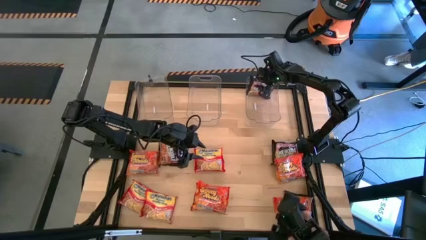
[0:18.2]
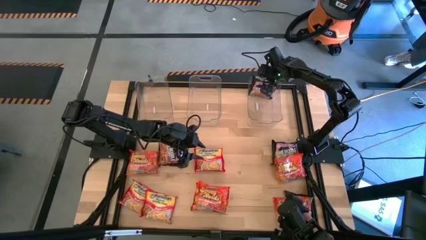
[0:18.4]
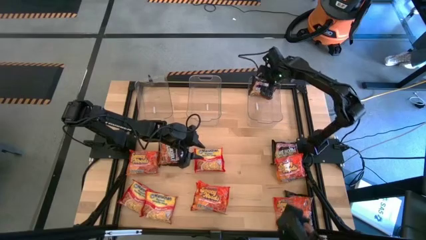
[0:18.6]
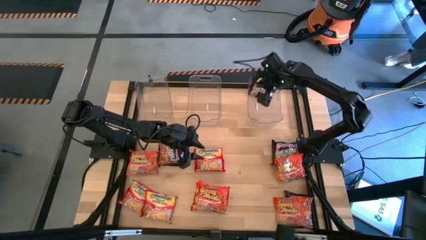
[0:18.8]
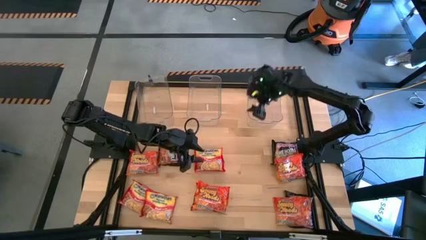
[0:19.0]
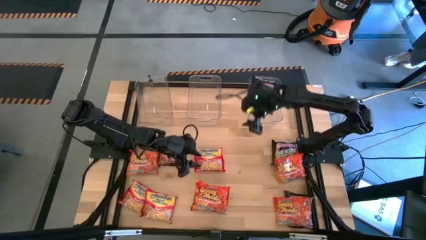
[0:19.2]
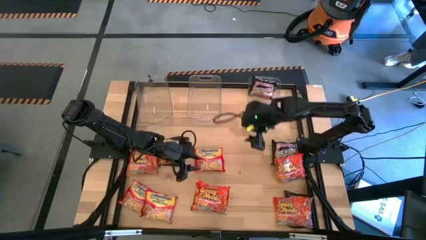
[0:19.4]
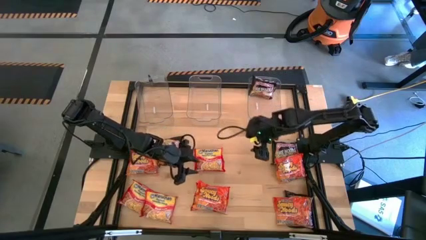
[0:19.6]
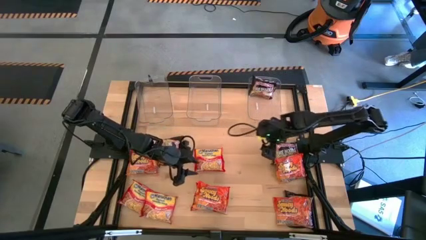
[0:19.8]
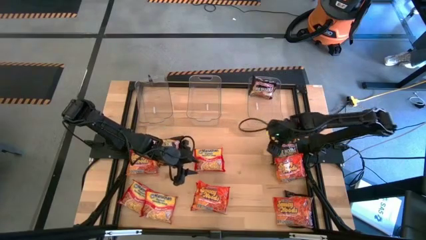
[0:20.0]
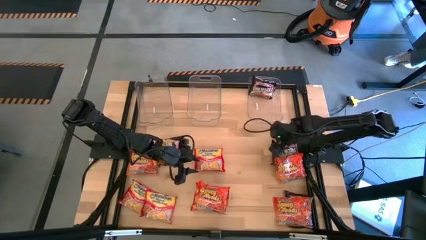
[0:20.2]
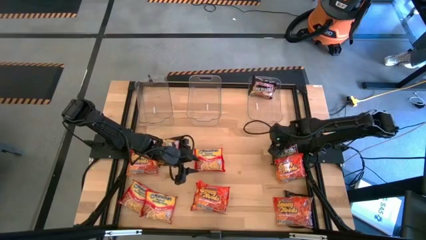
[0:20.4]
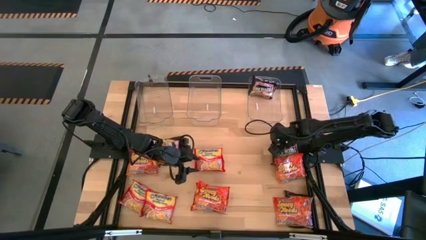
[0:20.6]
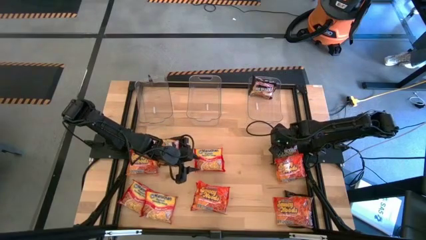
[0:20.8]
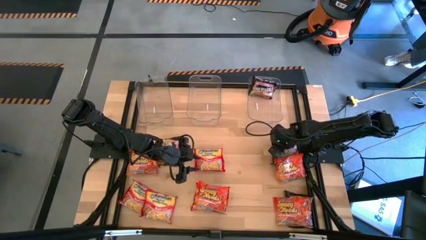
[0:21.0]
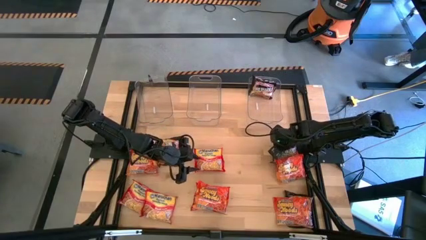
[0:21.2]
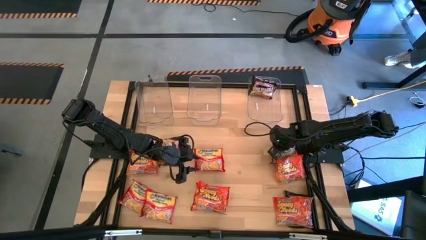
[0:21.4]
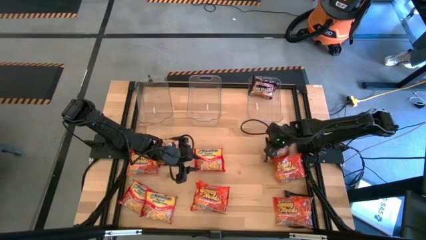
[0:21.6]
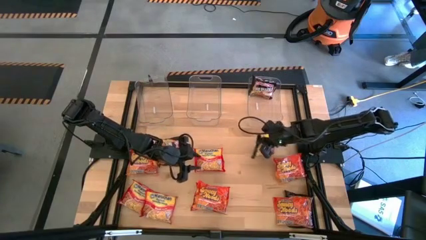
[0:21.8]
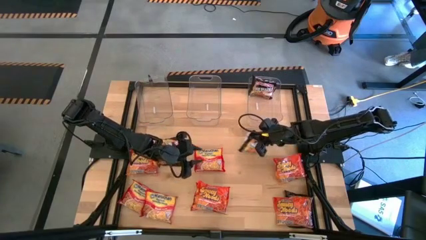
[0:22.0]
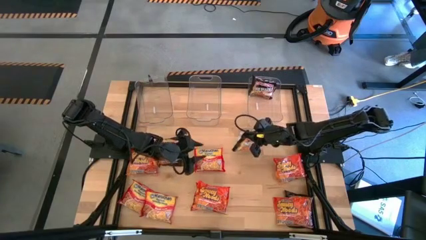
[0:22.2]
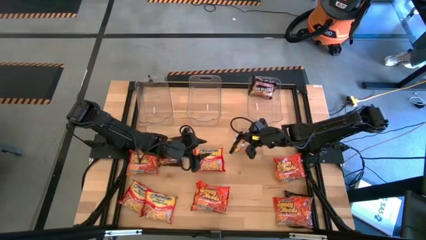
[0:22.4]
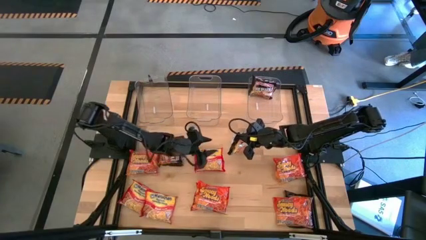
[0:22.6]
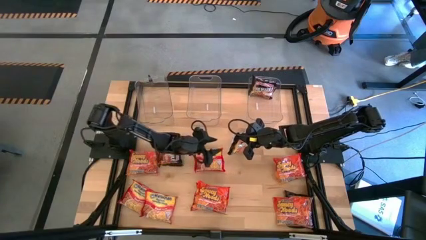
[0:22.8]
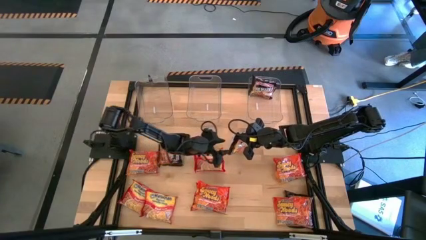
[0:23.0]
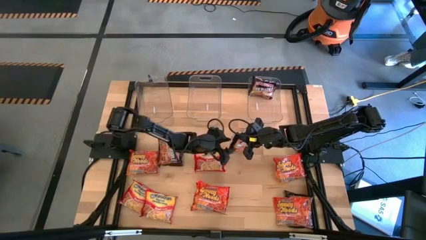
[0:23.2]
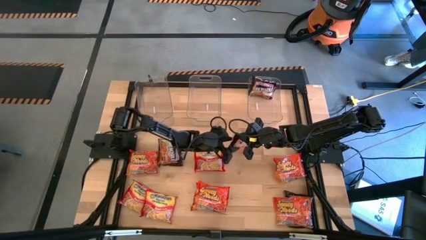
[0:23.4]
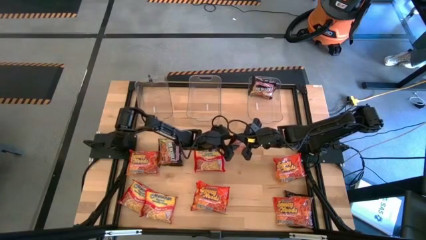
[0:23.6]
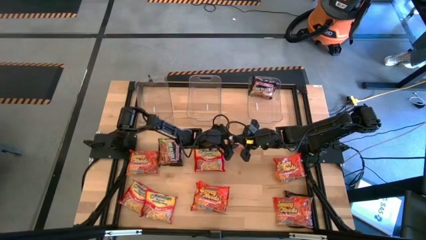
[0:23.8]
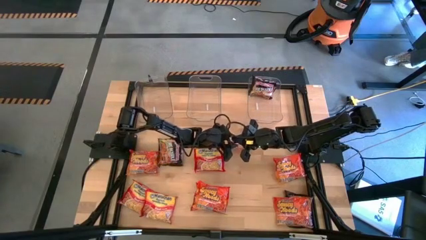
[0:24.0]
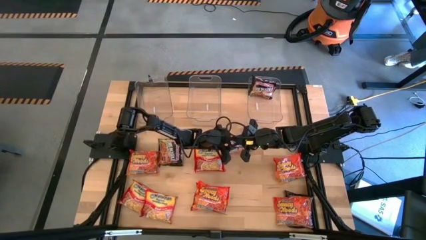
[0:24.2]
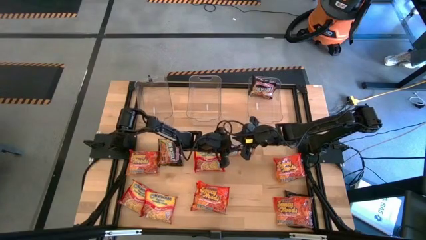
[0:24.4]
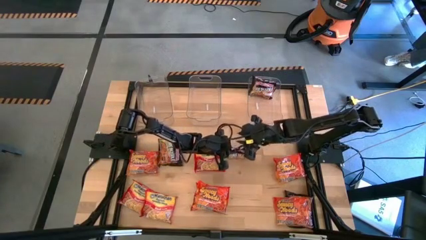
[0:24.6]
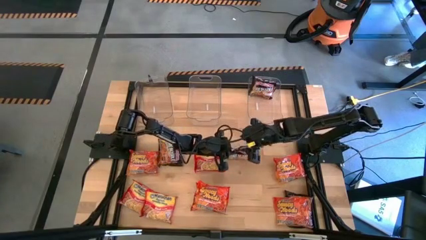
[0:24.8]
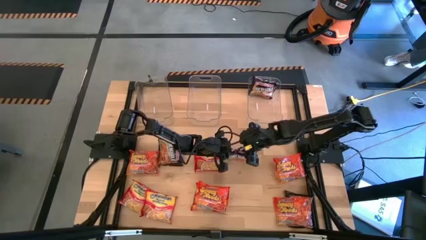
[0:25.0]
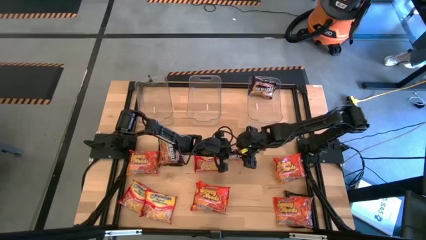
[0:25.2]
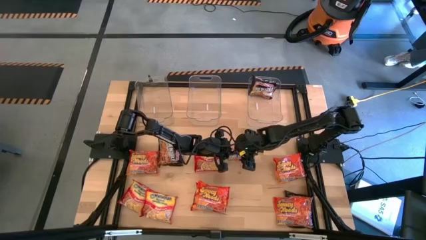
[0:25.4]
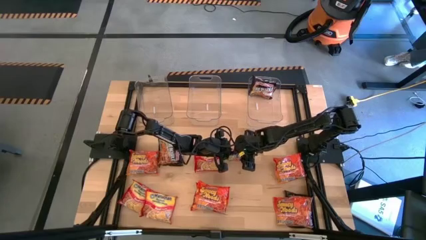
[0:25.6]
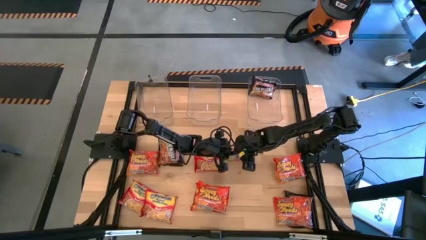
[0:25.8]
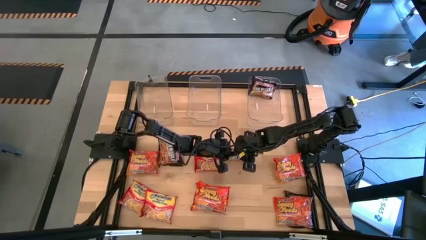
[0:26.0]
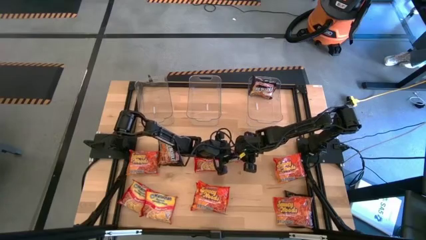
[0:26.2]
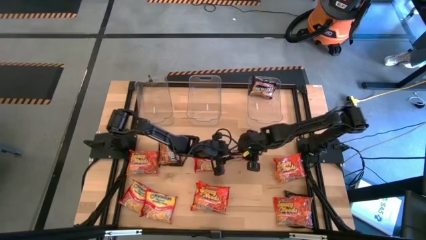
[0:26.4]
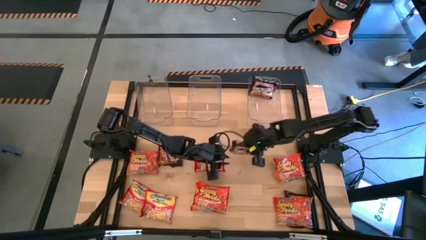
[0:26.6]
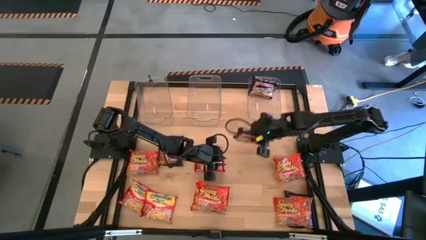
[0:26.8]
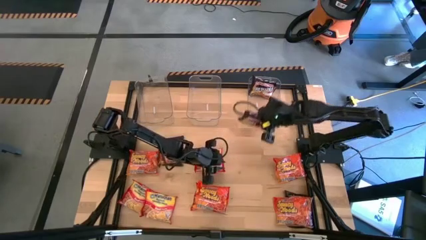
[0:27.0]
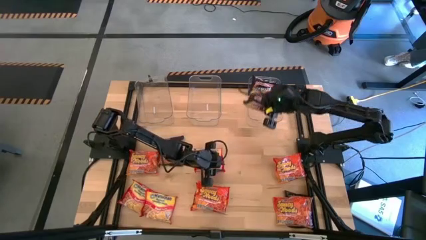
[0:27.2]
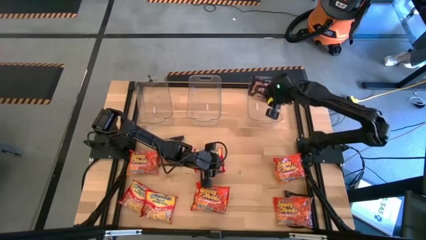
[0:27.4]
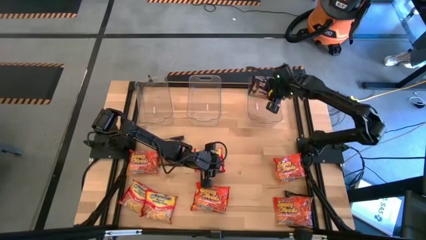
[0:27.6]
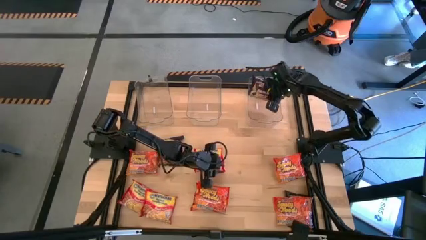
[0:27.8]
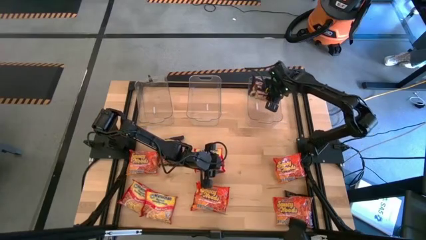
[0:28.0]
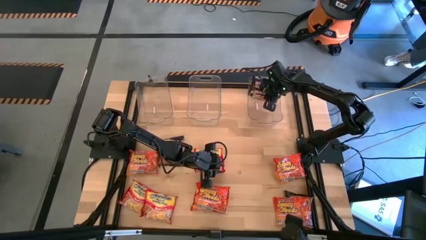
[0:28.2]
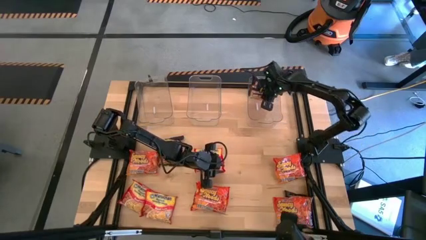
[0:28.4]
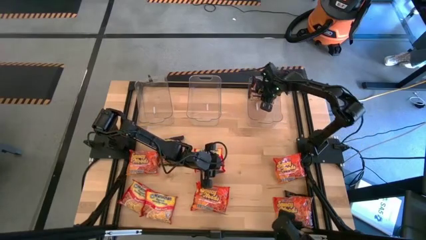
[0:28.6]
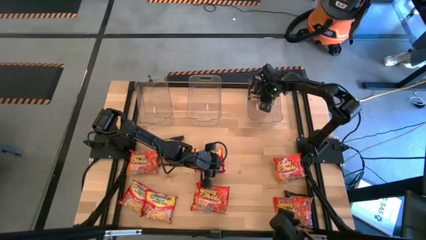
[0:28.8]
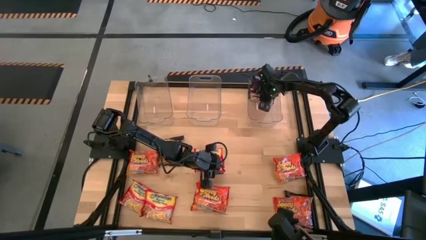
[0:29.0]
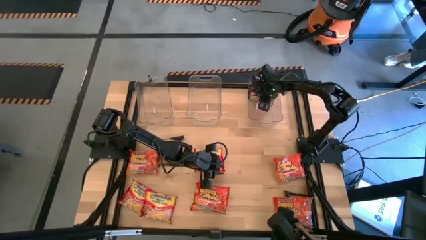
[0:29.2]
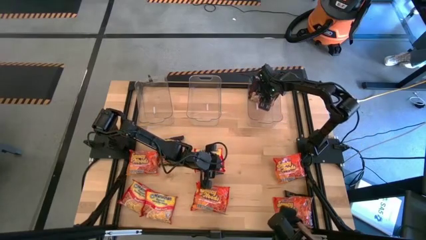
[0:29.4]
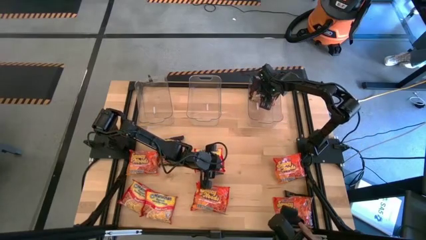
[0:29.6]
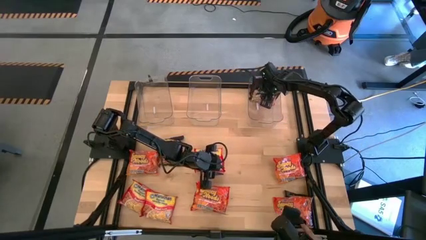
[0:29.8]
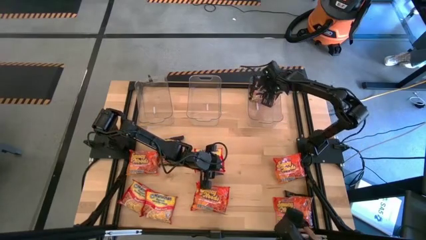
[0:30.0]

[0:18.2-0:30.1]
Task: Sort Maruchan noodles
Put the black noodle pack into the right transparent bin
